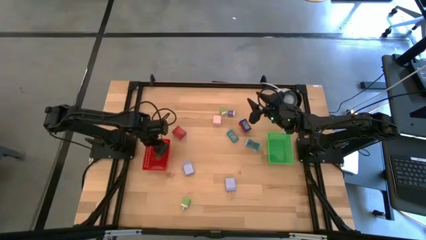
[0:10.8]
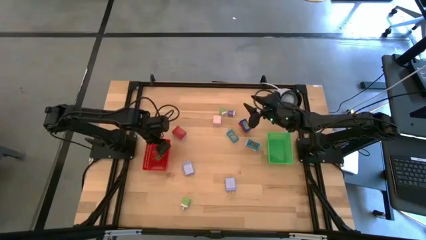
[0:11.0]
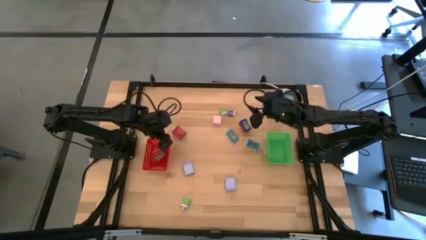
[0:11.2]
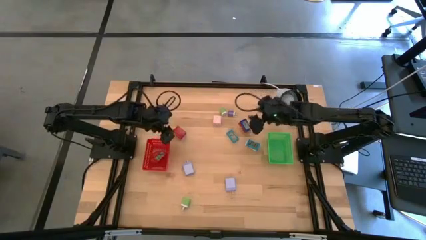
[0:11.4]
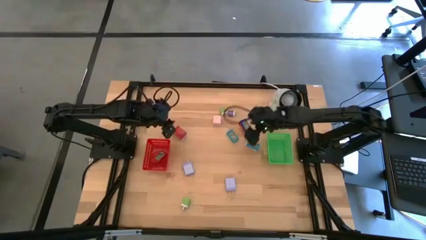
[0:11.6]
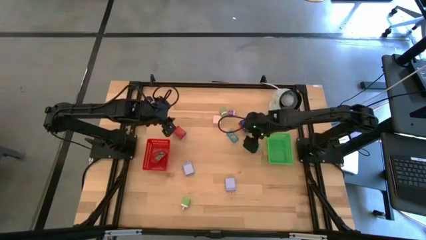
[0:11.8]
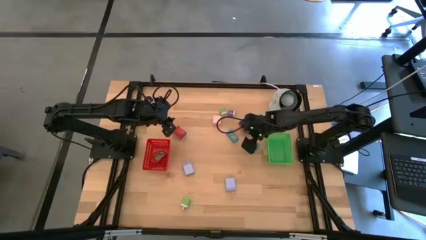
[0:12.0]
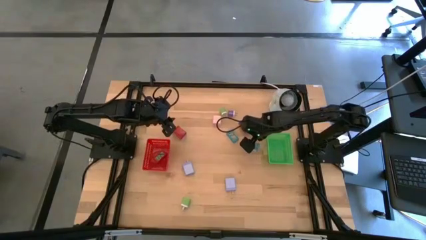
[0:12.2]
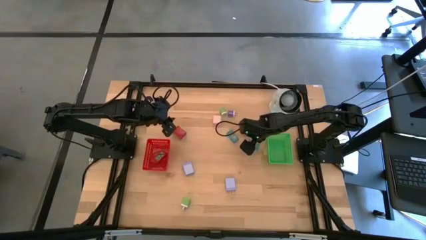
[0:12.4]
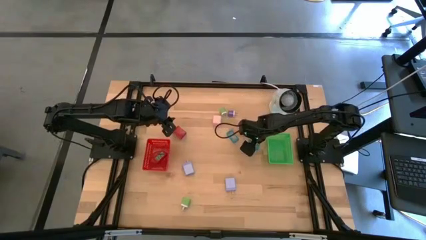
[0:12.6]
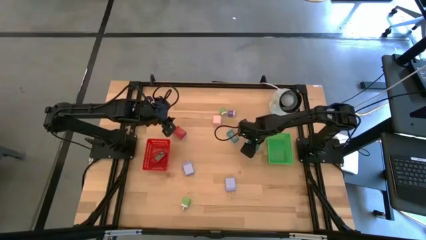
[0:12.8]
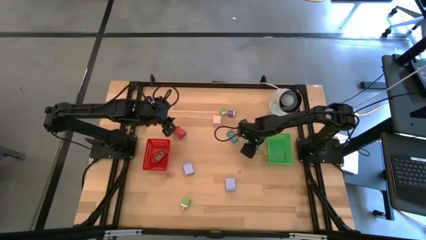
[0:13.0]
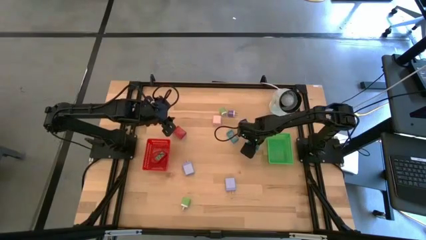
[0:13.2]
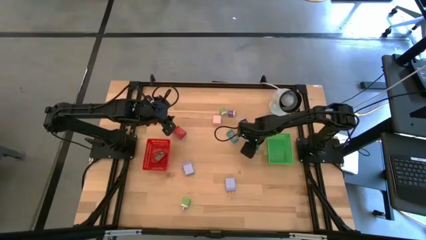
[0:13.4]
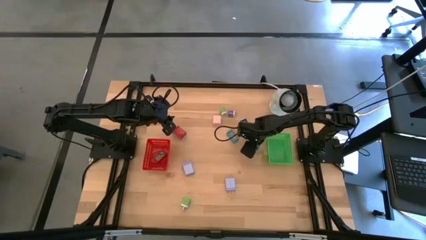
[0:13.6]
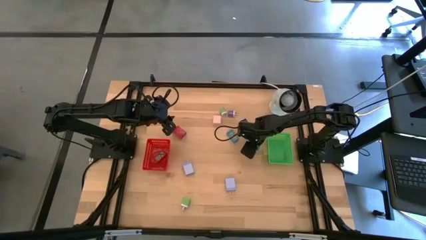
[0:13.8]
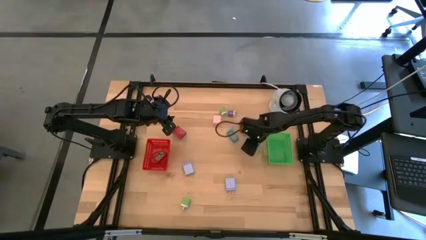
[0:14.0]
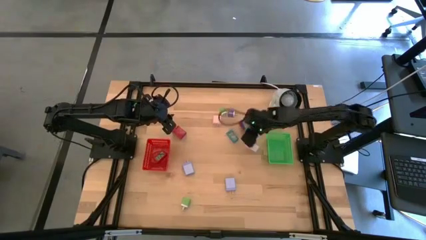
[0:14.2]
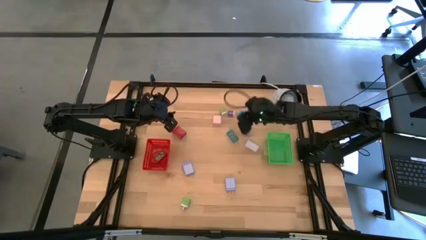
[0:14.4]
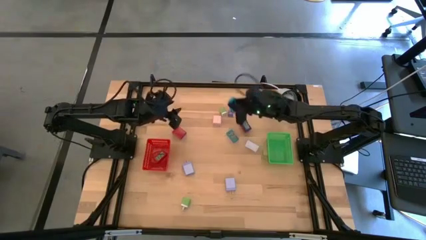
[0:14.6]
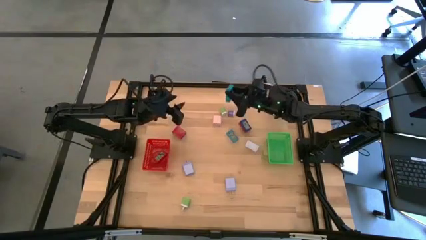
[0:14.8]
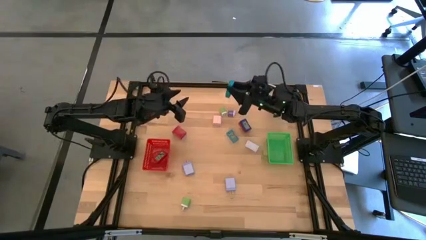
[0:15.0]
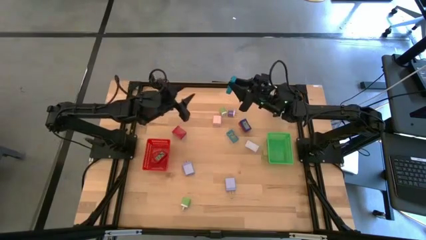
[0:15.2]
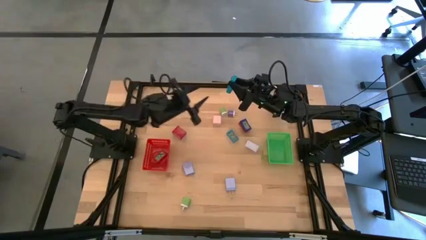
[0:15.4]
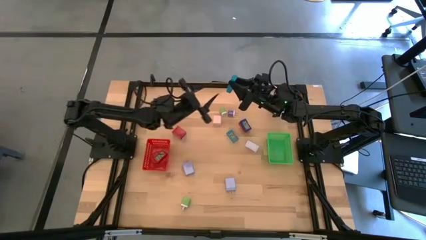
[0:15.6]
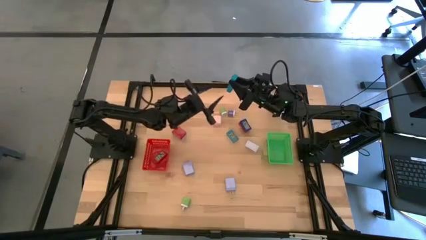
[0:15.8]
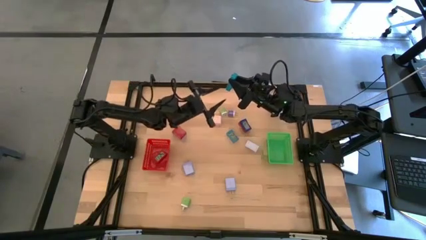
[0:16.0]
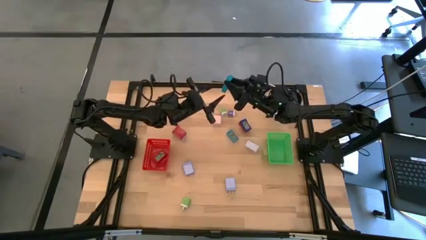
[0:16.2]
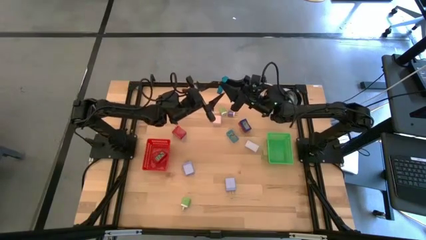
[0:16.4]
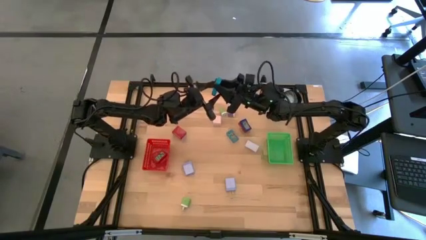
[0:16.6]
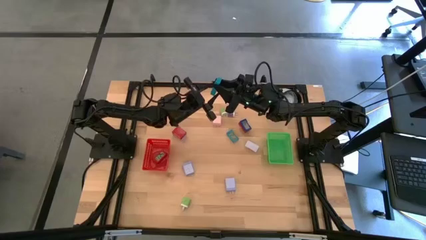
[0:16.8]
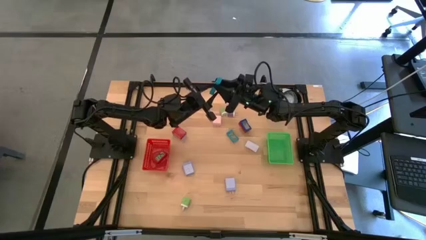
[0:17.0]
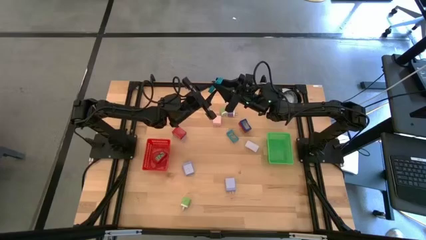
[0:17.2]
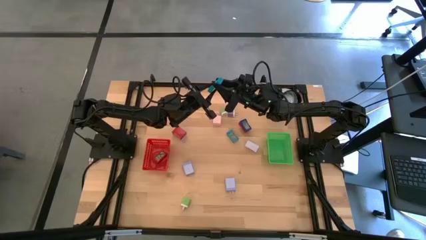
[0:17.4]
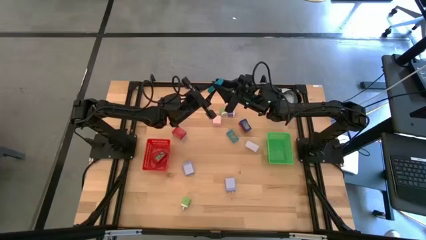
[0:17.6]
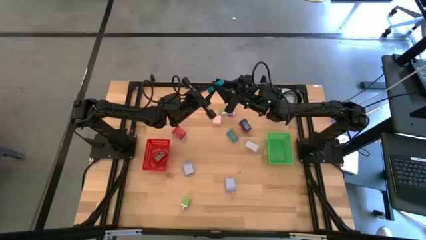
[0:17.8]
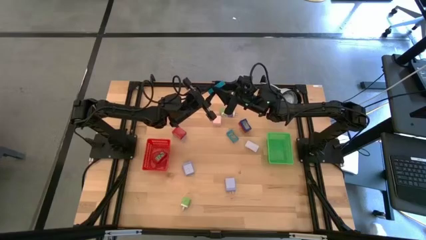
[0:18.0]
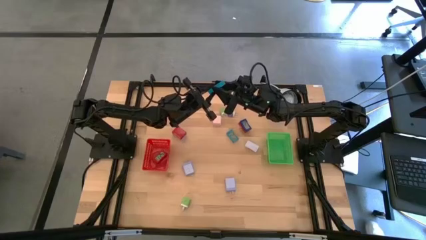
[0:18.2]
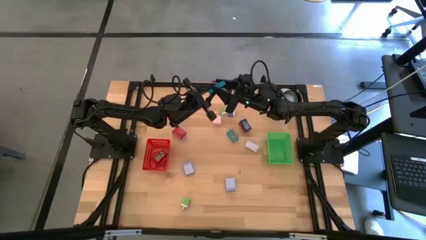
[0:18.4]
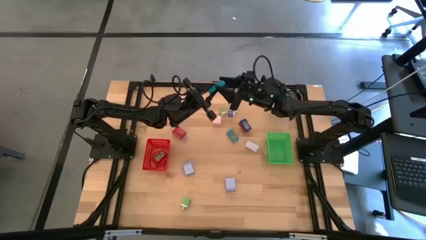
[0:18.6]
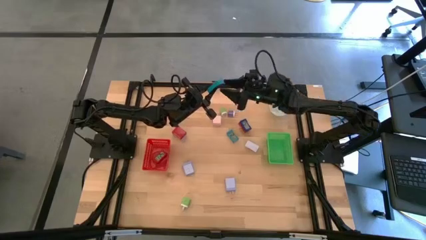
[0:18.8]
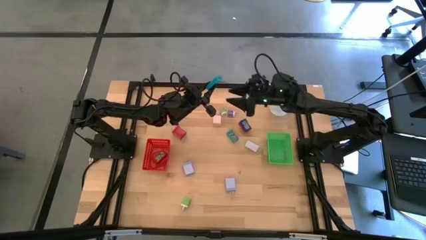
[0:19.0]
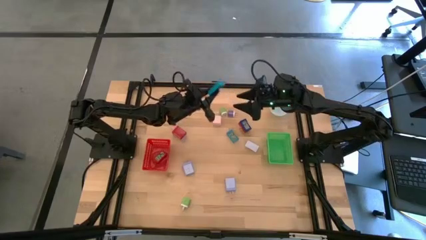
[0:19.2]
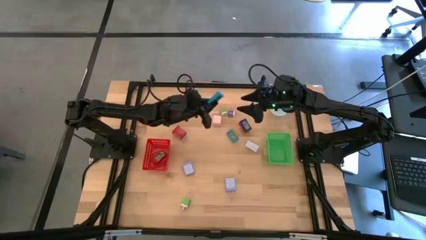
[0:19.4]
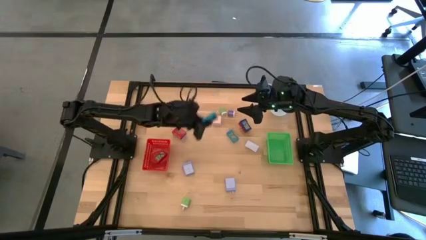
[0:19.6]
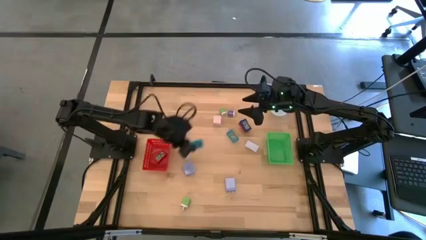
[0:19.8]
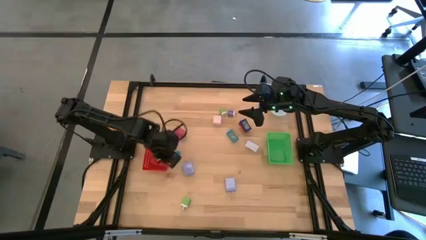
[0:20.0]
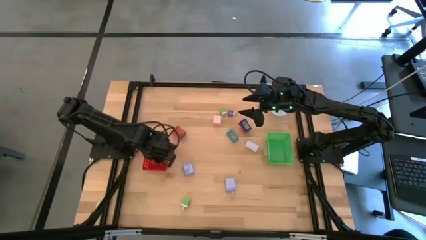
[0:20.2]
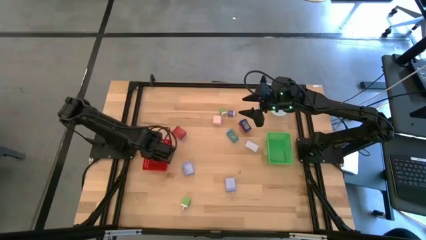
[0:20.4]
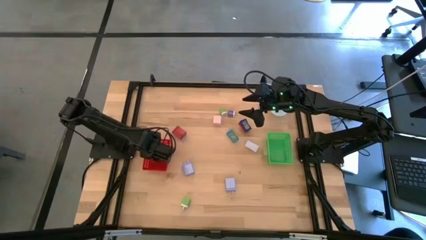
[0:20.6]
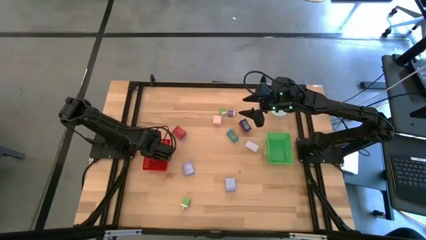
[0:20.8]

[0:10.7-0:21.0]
Task: Pick & Place Office items
Put the right light blue digital timer into the orange basket
